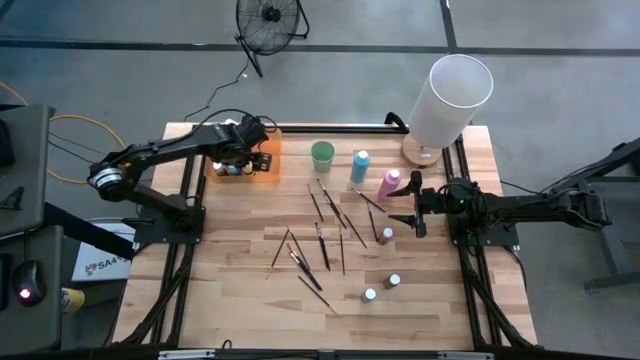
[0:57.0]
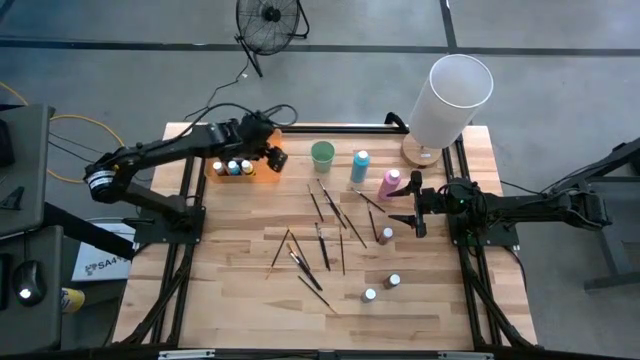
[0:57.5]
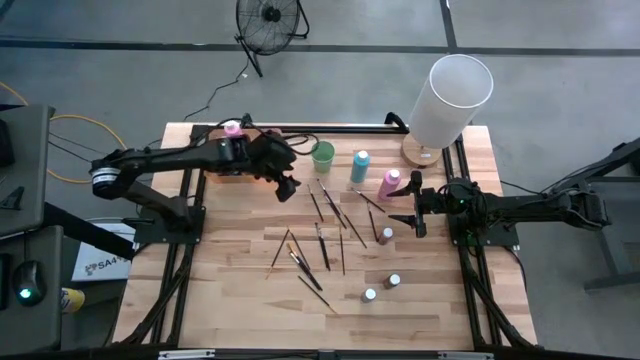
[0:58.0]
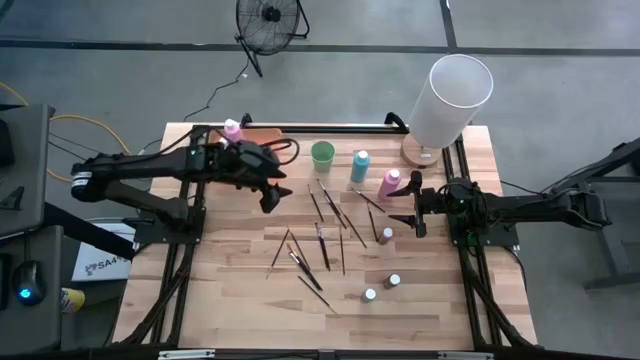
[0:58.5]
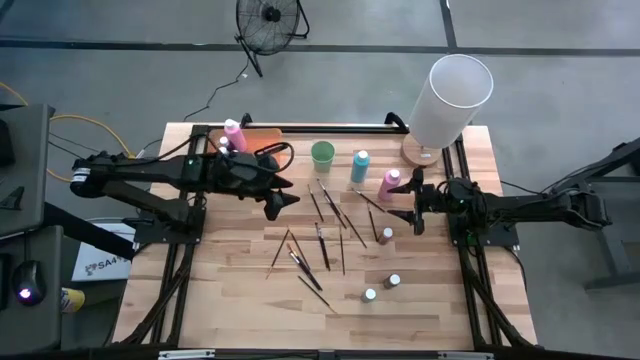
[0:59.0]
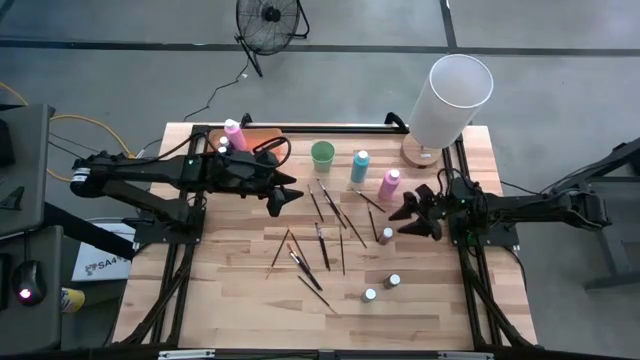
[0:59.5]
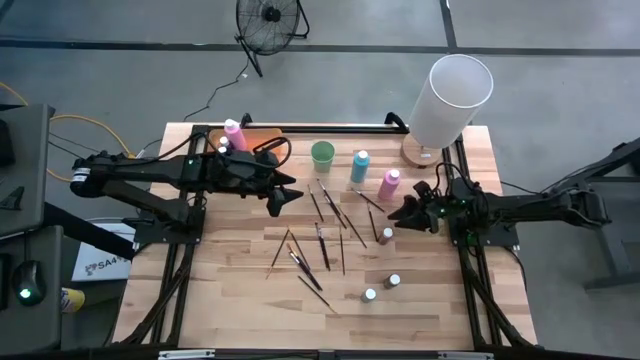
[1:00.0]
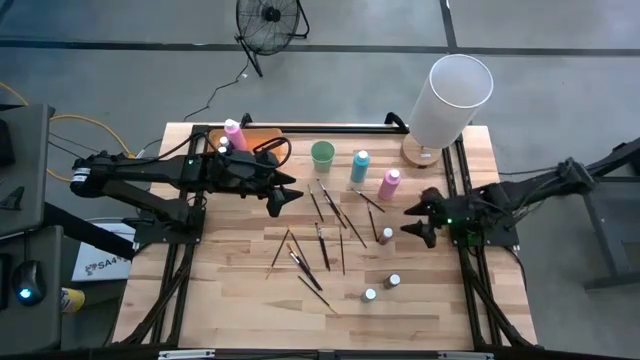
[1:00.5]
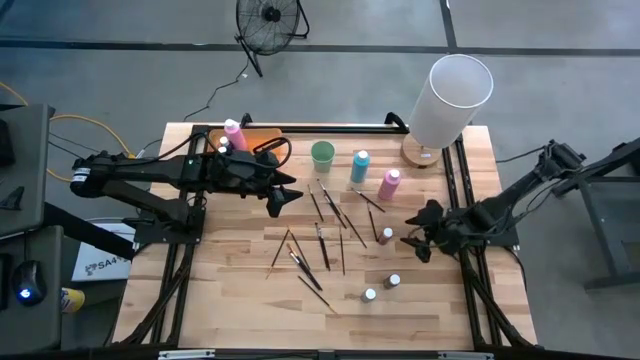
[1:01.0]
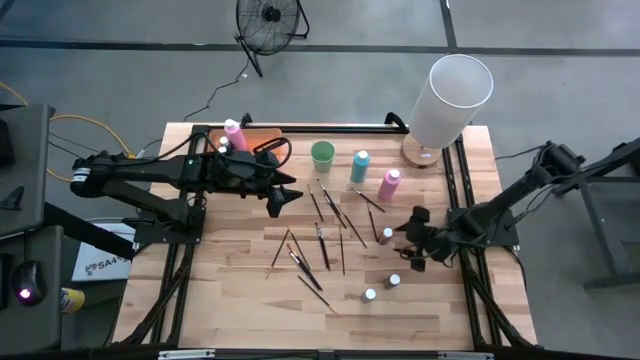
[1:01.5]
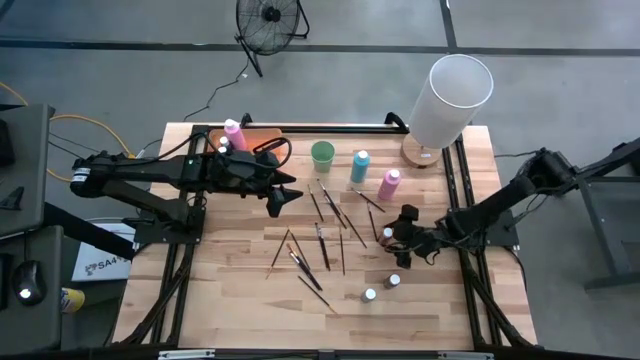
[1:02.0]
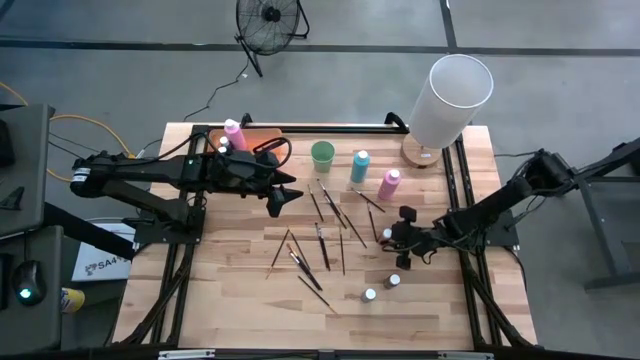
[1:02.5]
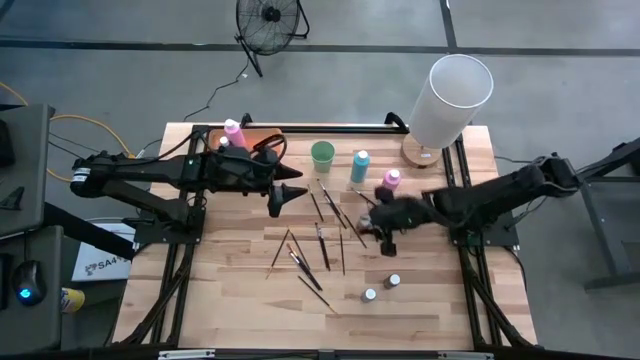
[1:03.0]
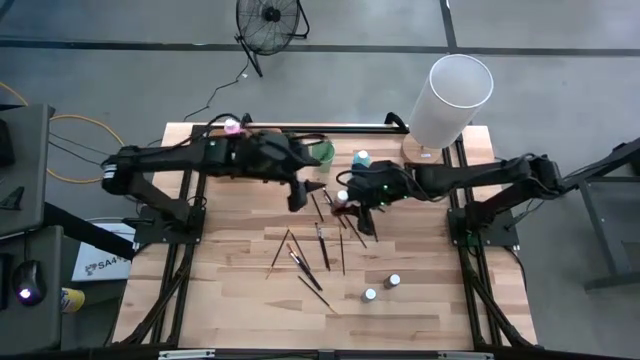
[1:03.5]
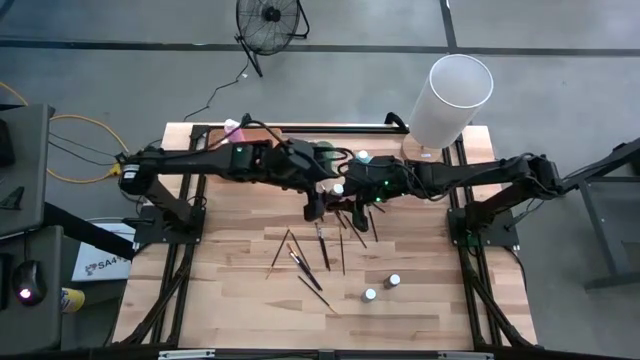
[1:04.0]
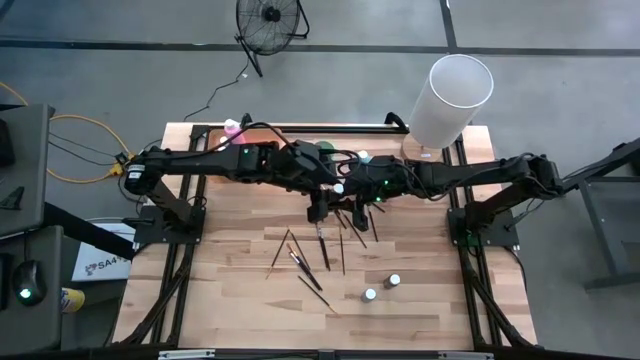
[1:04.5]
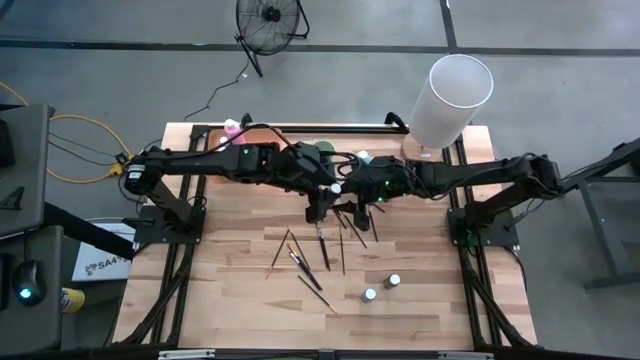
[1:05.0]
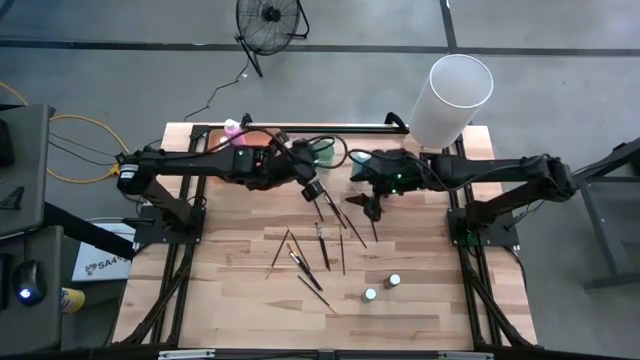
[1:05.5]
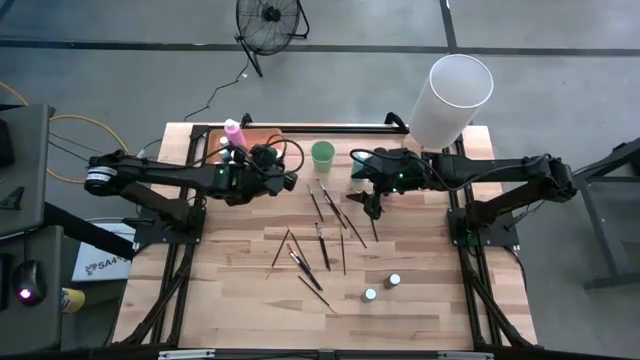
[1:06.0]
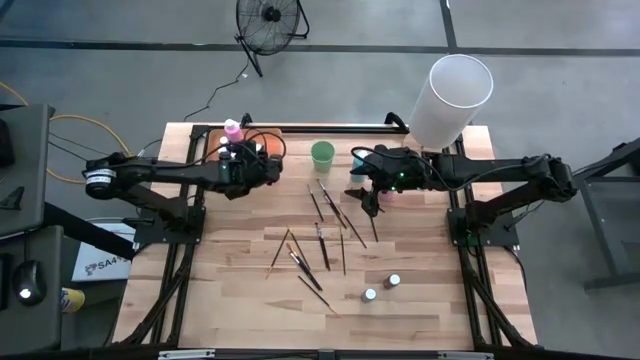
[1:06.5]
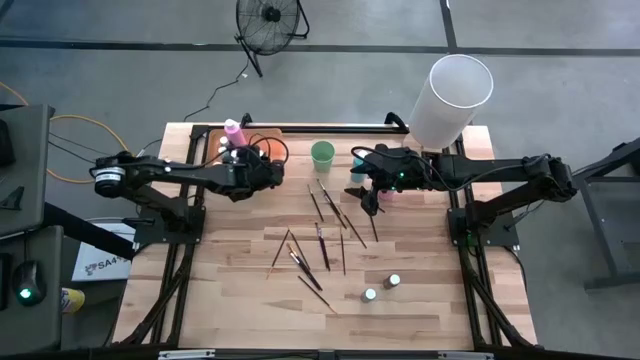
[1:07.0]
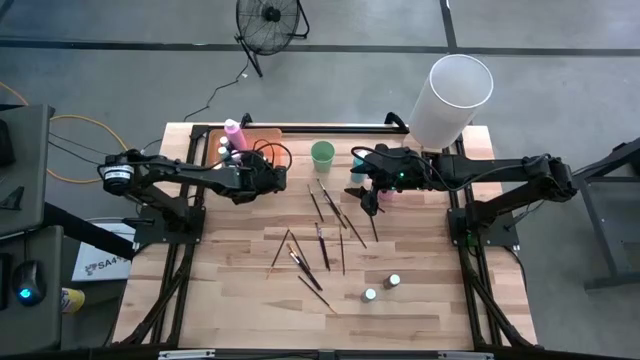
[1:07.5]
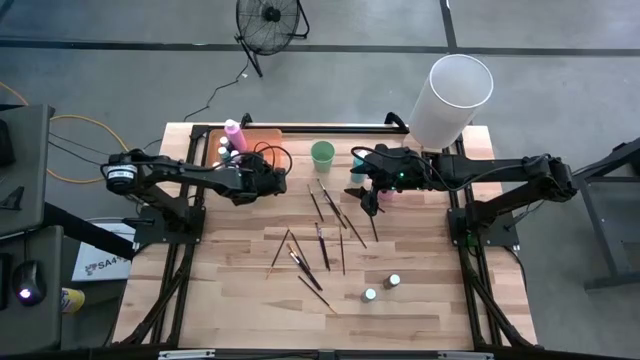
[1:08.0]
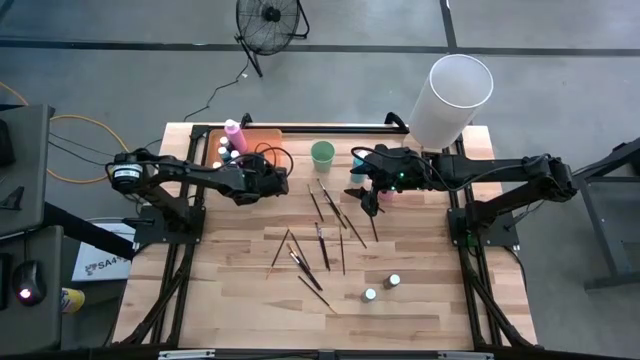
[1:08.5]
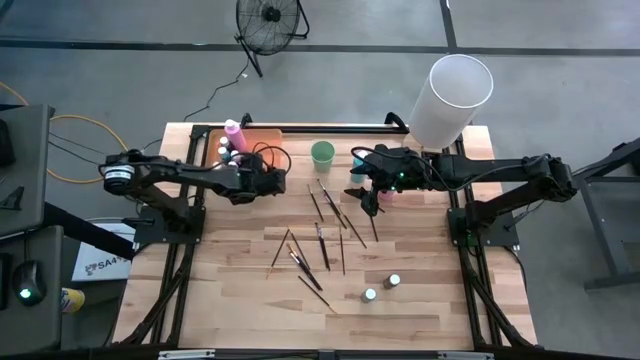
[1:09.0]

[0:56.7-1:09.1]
Task: Pick & Place Paint Supplies
Put the brown paint bottle into the orange bin

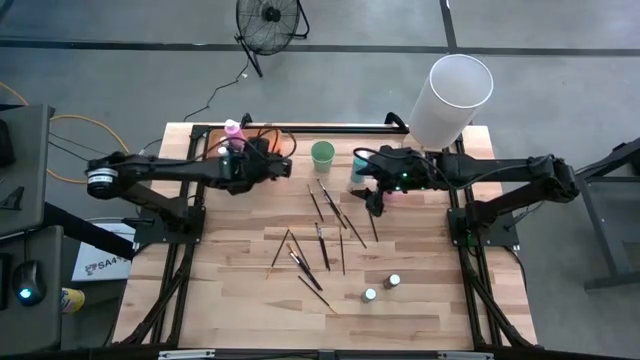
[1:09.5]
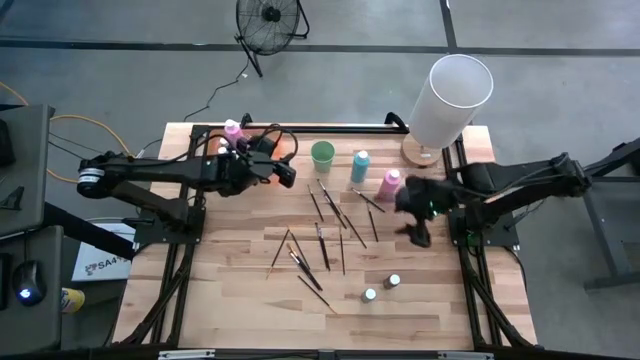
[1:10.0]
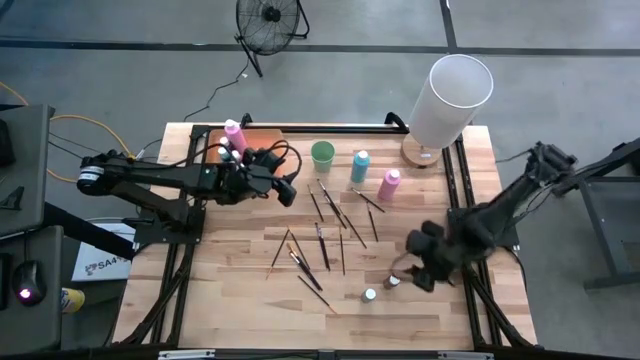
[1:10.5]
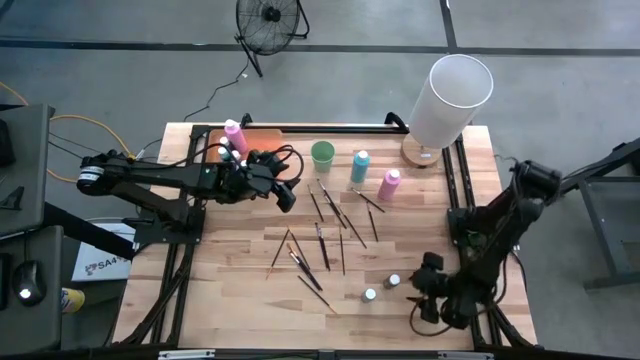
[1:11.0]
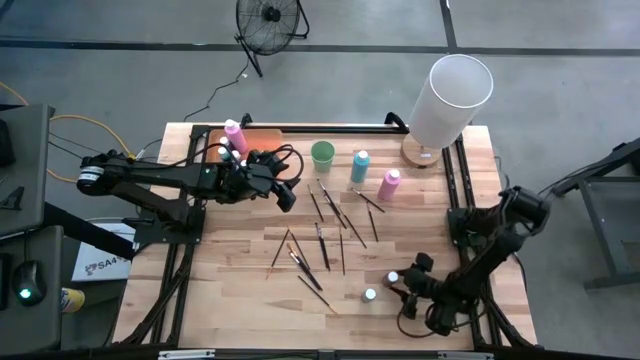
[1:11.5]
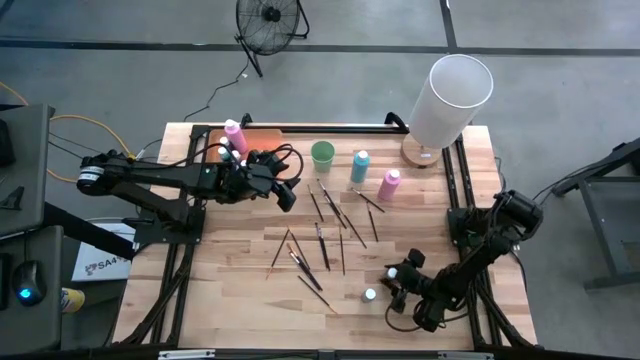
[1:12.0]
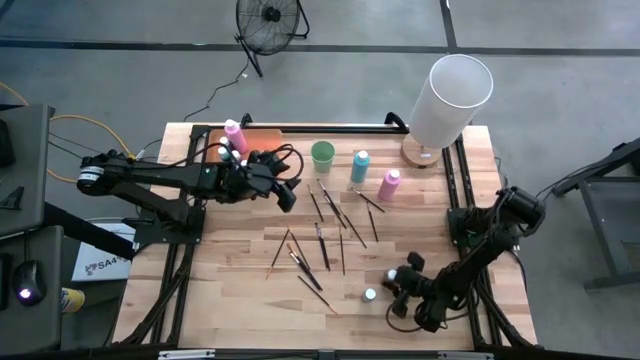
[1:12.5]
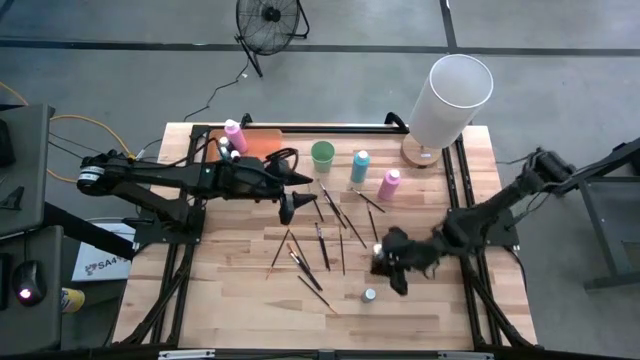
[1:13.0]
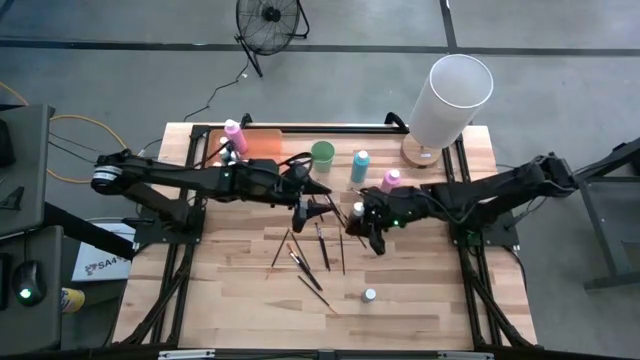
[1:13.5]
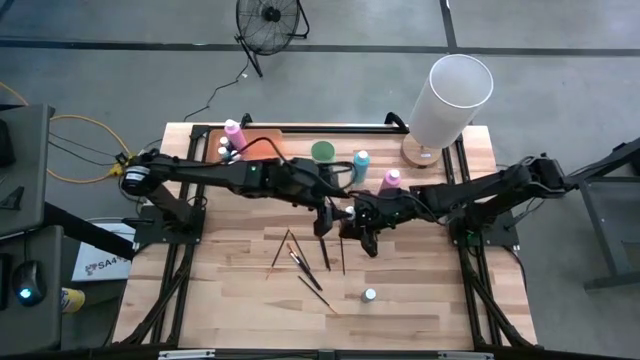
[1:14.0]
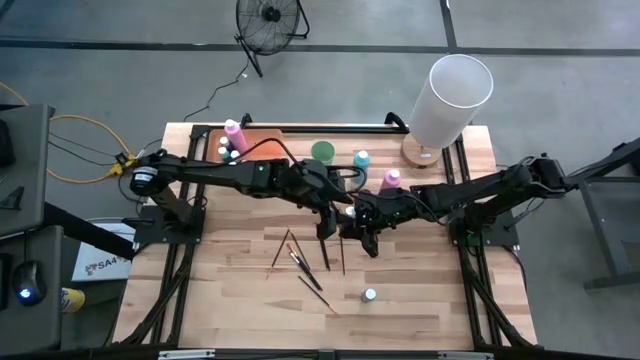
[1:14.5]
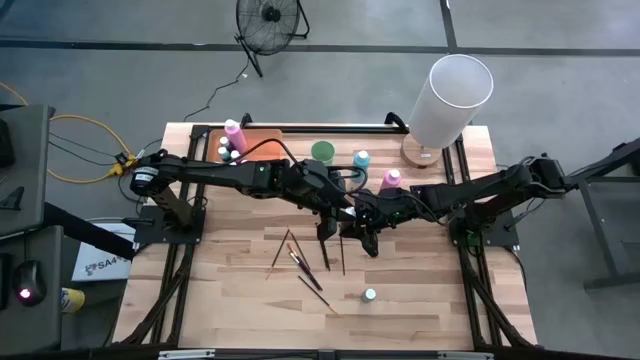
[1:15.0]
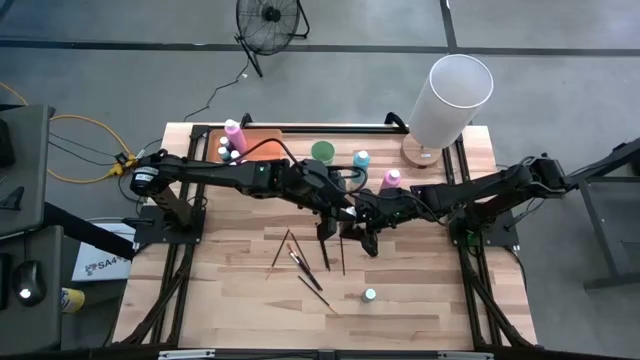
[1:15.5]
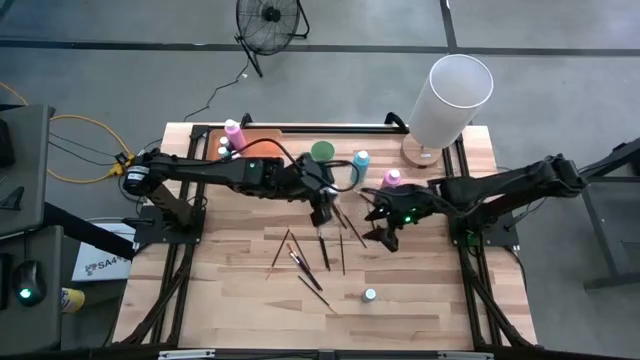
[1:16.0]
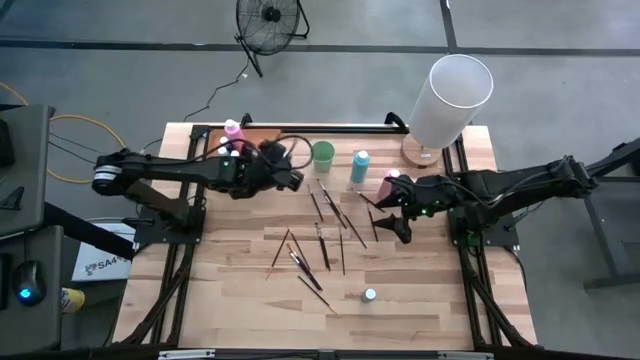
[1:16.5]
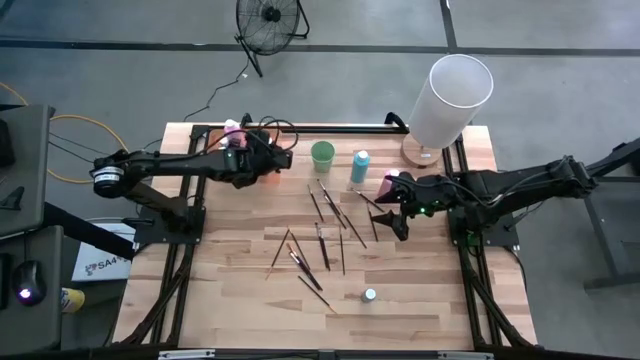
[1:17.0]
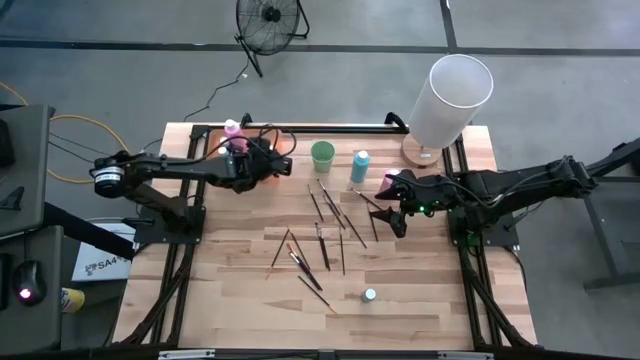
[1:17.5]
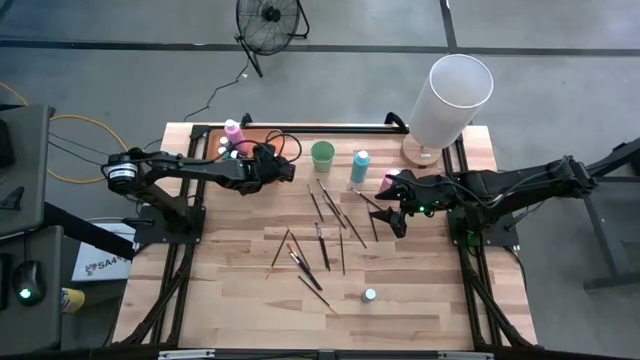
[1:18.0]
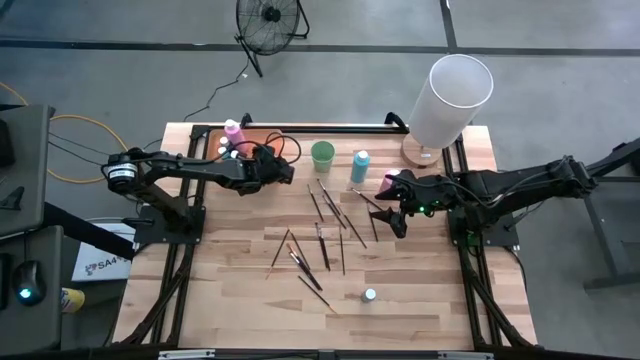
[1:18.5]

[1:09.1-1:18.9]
Put the brown paint bottle into the orange bin
